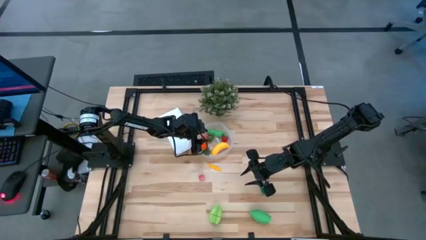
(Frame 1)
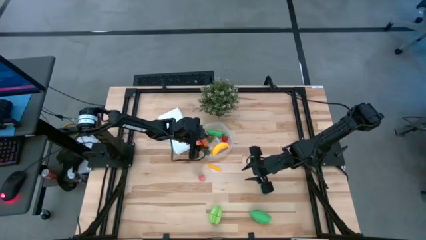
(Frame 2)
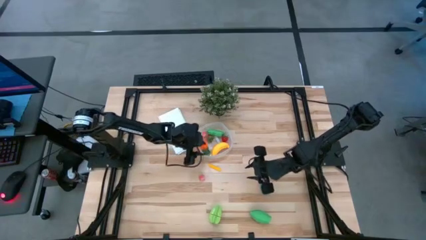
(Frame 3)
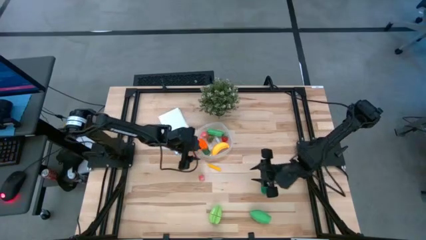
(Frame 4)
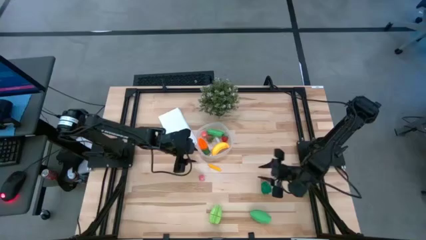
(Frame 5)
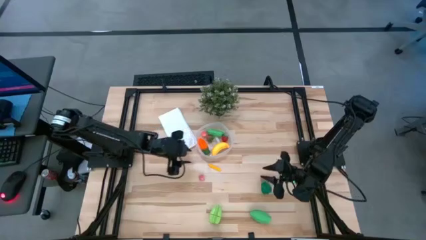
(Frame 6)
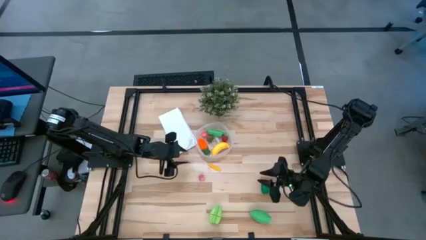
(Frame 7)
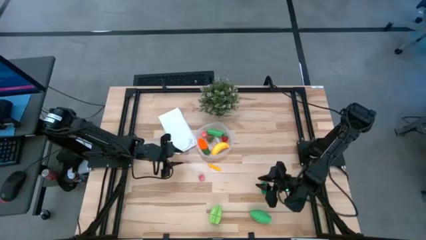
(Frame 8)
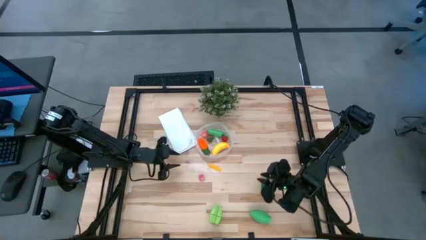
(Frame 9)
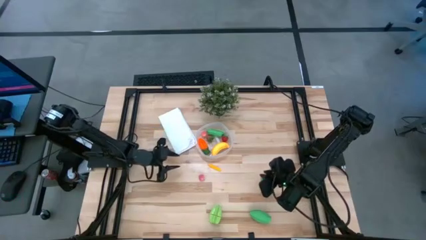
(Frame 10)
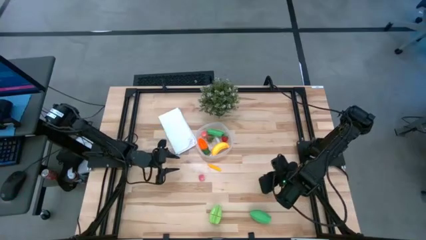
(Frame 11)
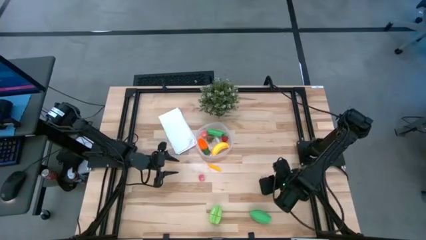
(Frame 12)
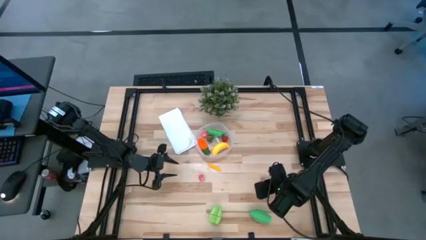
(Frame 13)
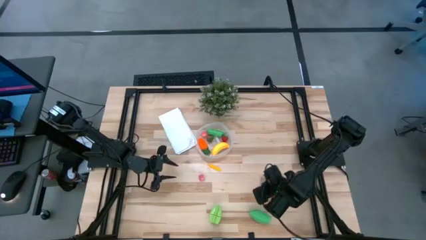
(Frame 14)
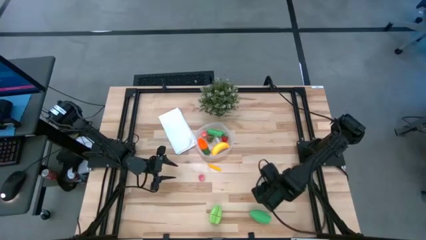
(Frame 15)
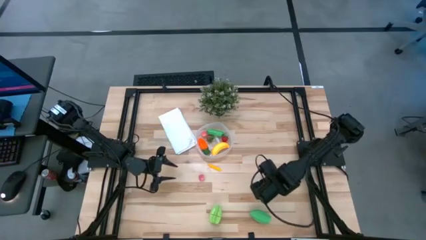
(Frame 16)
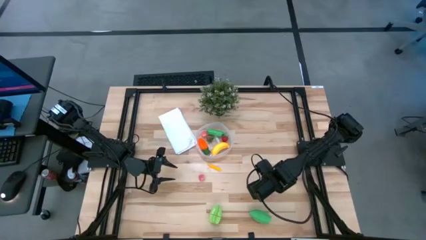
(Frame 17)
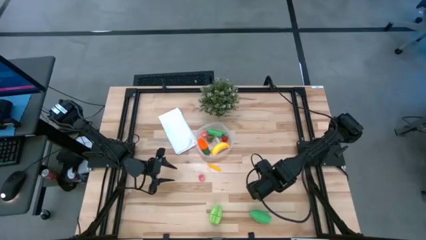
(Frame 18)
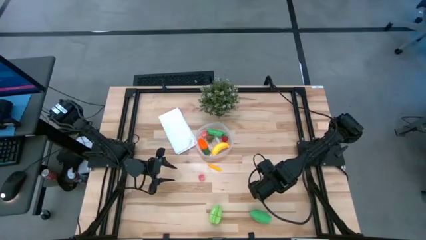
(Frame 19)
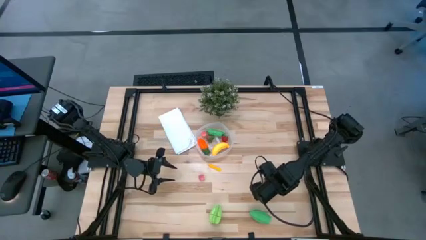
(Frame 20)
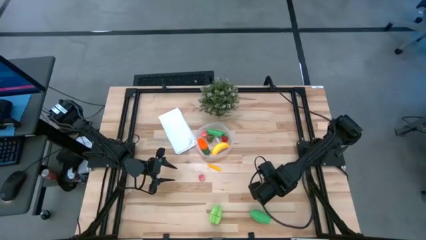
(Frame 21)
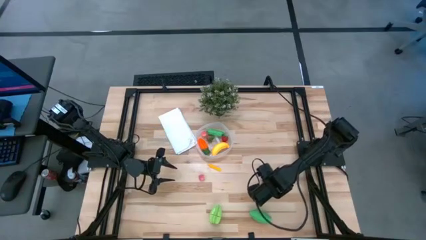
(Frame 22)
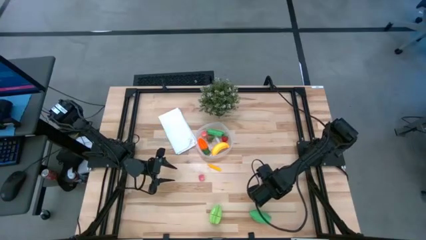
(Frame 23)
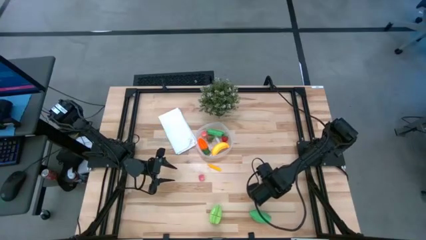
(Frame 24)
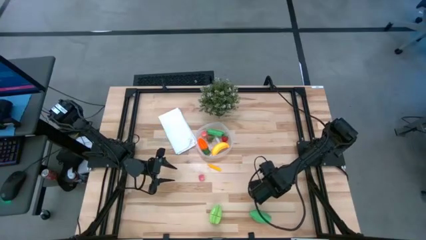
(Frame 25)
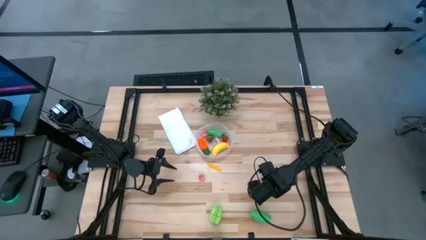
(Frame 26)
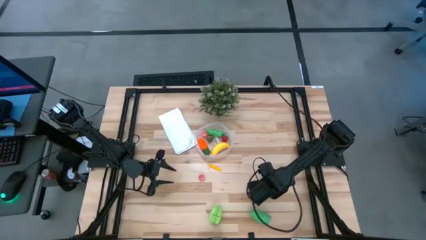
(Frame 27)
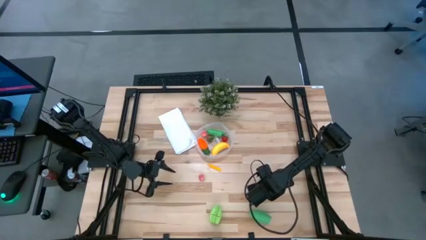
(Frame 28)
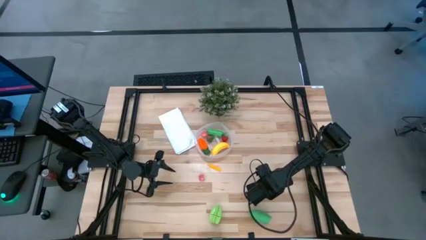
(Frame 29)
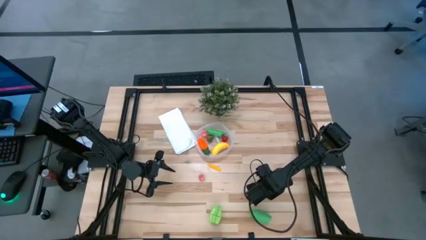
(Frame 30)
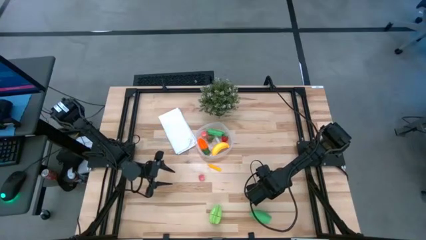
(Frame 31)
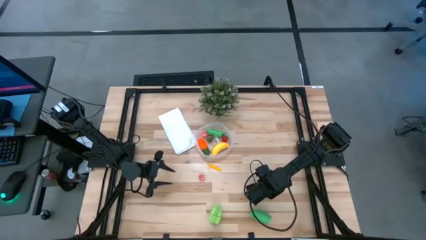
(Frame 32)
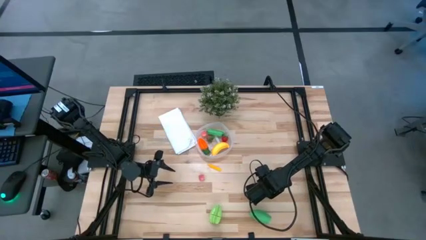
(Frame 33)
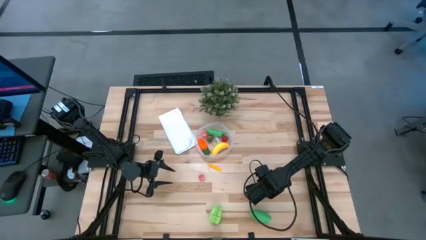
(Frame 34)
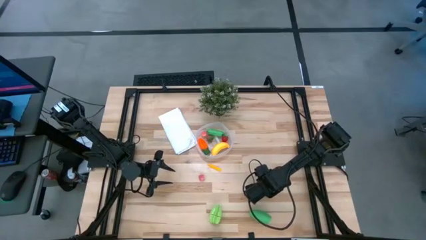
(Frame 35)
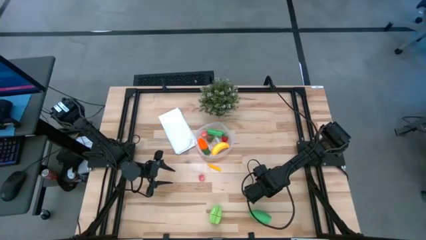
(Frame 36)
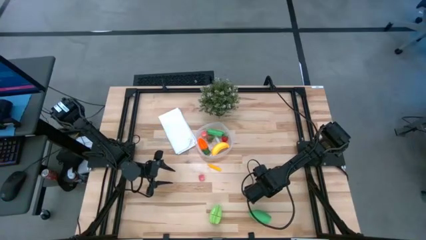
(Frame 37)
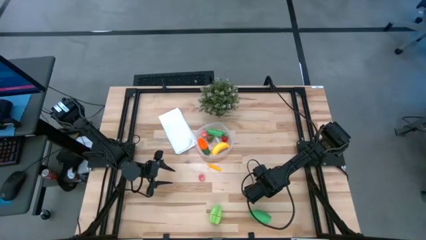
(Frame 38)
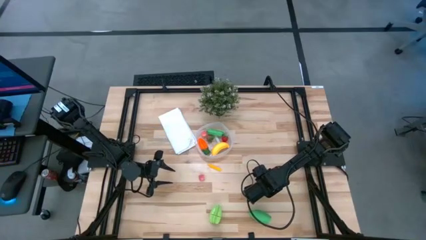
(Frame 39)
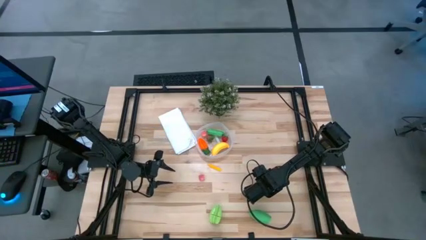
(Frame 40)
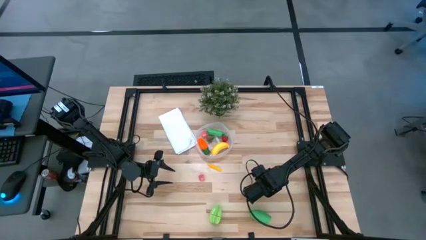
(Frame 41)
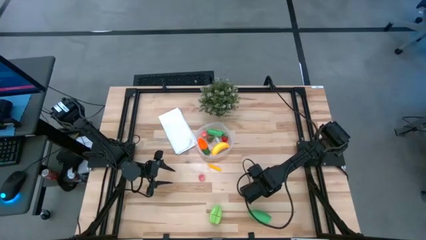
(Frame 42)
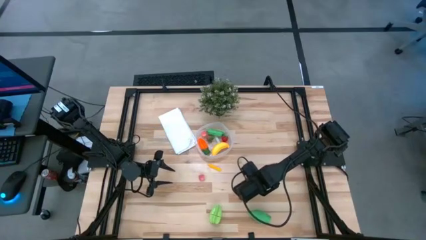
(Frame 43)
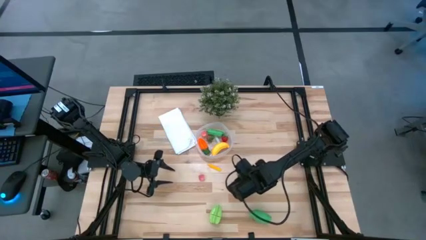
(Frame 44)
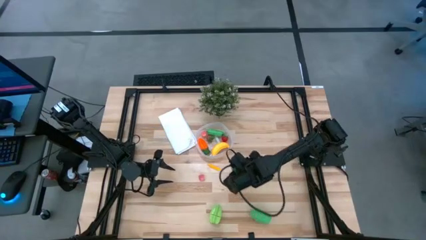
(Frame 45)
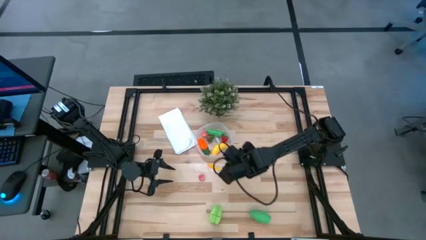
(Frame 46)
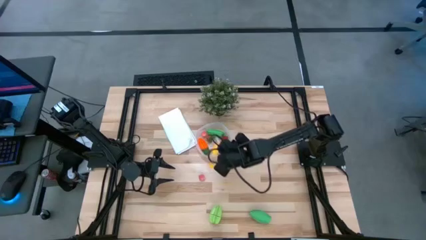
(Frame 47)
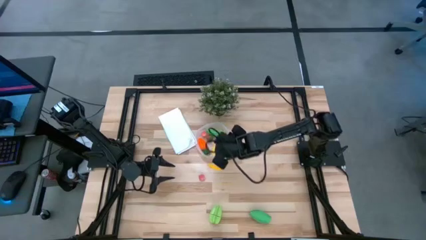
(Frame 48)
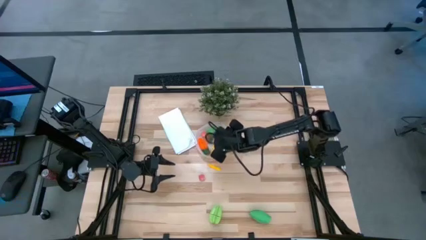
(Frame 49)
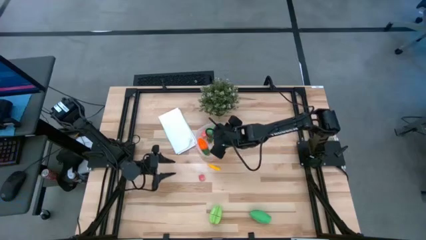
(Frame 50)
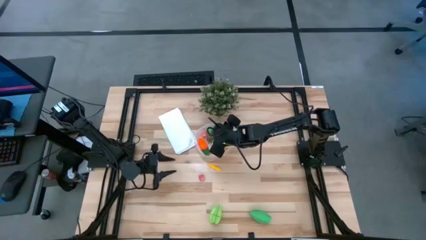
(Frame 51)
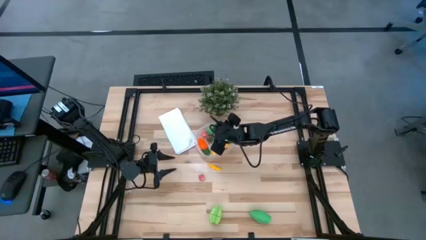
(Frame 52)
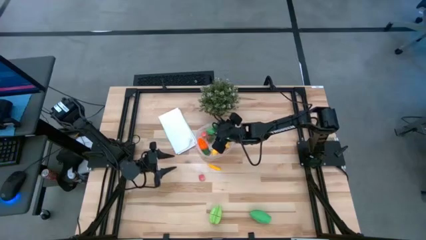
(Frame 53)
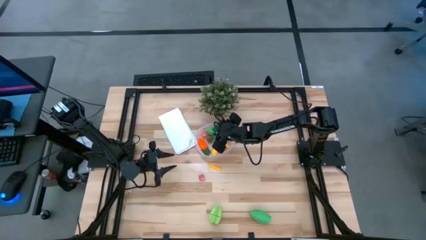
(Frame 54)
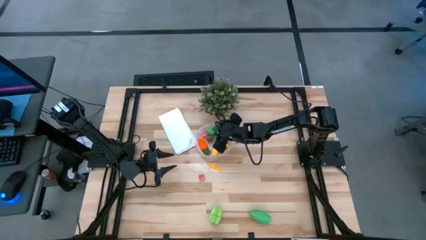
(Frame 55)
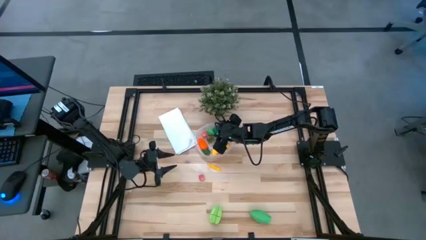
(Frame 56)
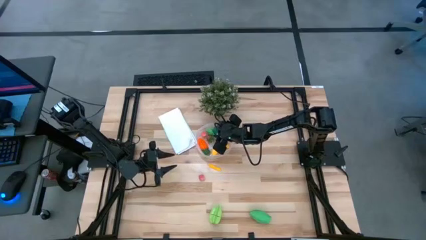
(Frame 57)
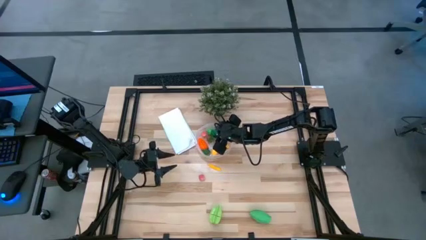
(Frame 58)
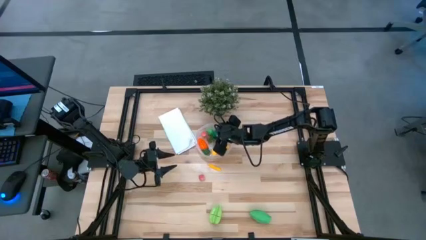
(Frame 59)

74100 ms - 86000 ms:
Task: Pick and placing Produce into tupperware
Put the green bell pepper into the transparent bin

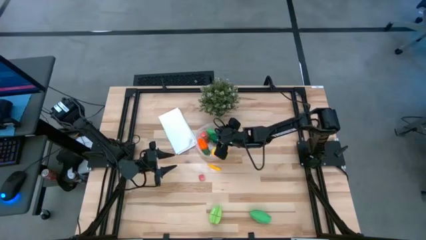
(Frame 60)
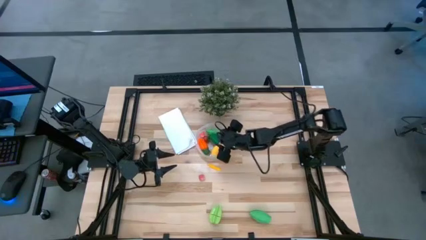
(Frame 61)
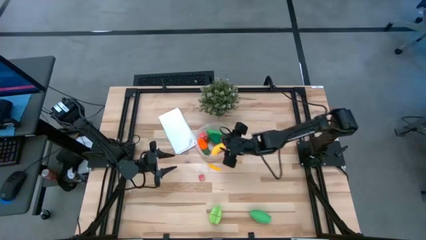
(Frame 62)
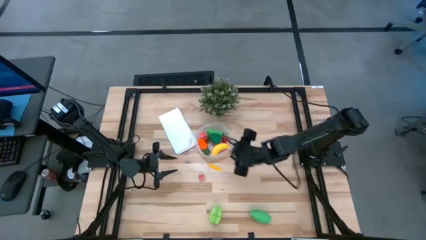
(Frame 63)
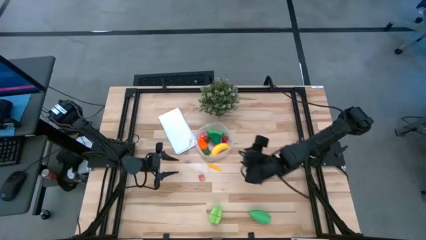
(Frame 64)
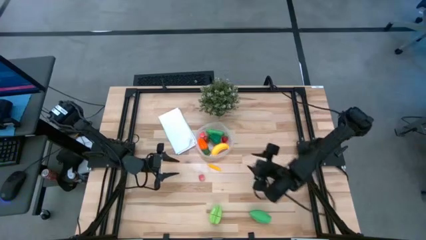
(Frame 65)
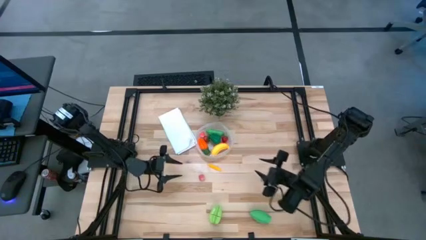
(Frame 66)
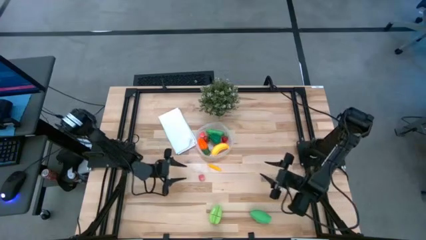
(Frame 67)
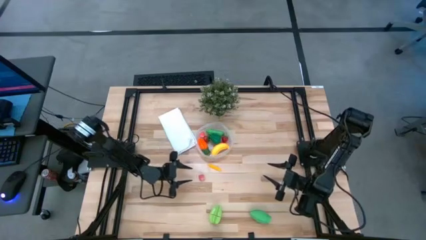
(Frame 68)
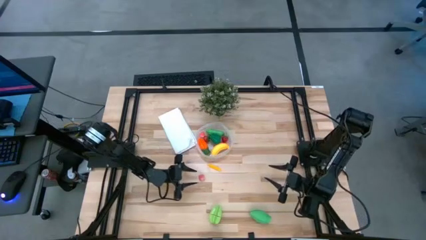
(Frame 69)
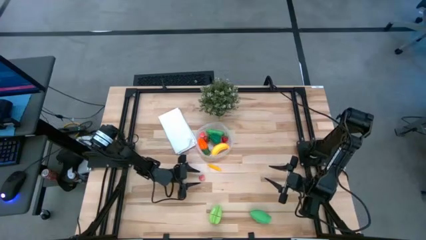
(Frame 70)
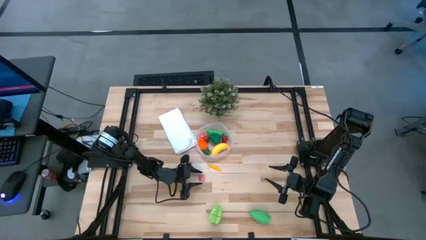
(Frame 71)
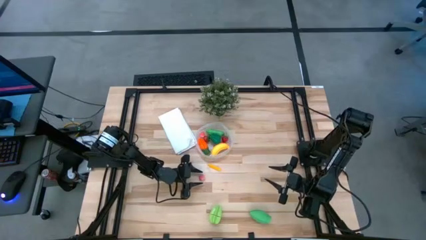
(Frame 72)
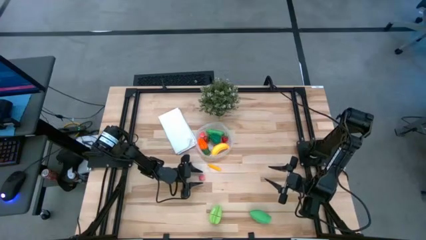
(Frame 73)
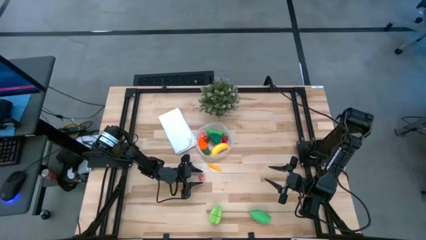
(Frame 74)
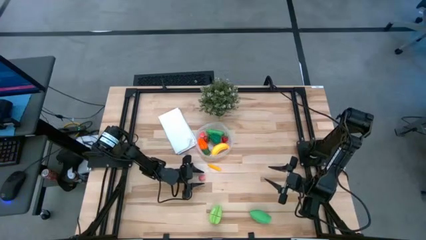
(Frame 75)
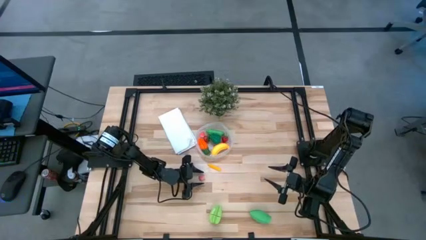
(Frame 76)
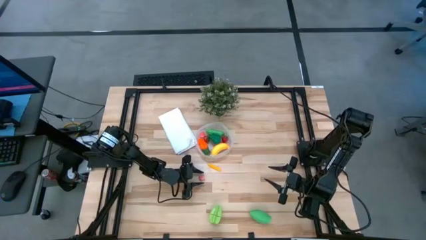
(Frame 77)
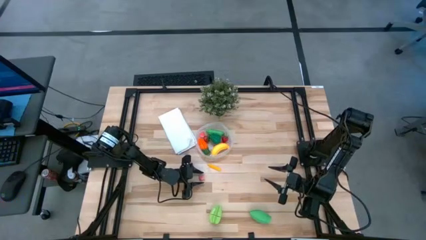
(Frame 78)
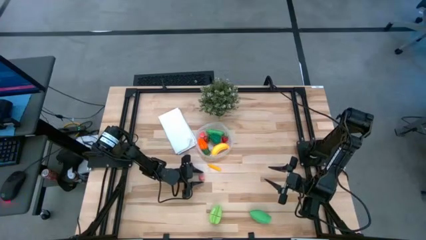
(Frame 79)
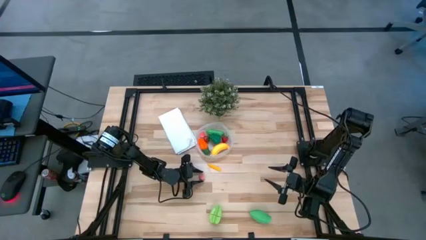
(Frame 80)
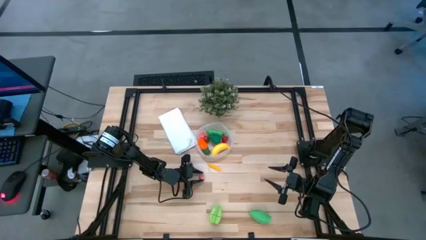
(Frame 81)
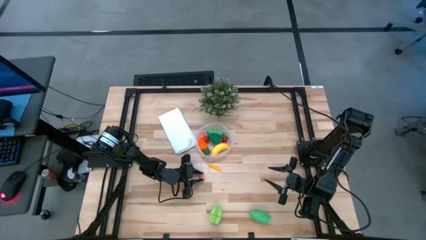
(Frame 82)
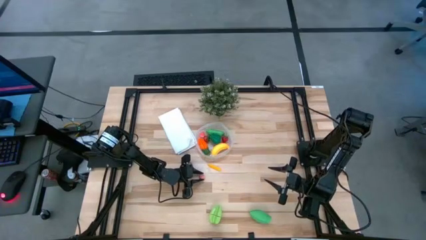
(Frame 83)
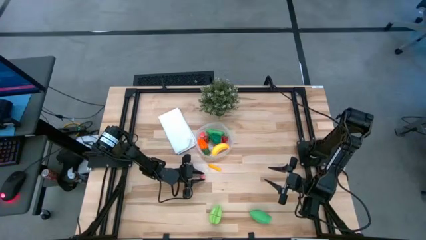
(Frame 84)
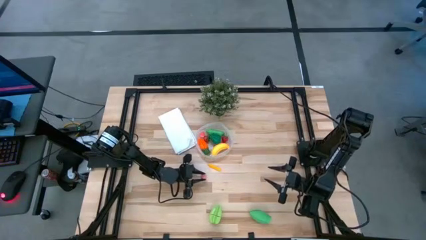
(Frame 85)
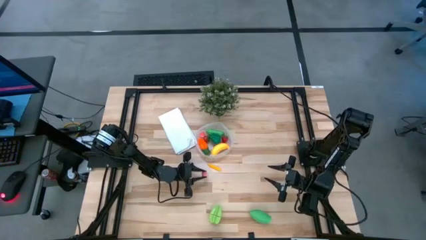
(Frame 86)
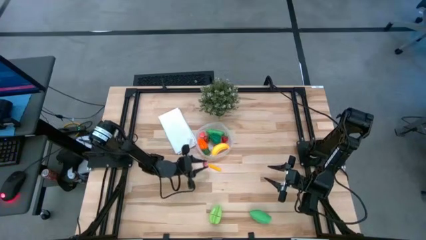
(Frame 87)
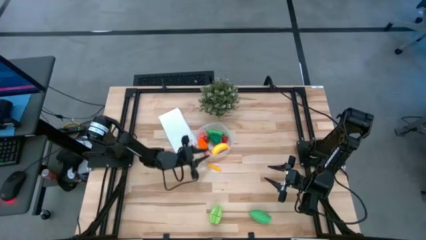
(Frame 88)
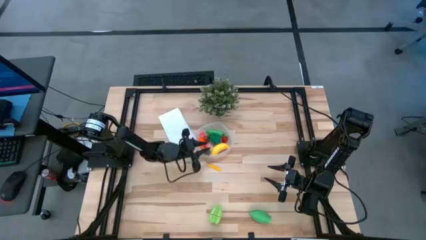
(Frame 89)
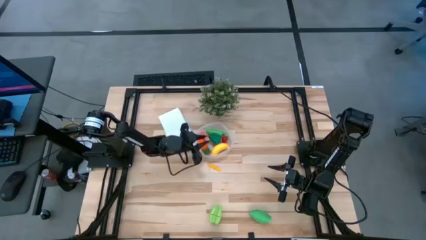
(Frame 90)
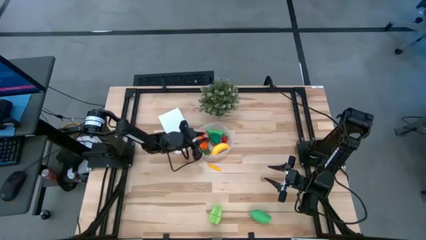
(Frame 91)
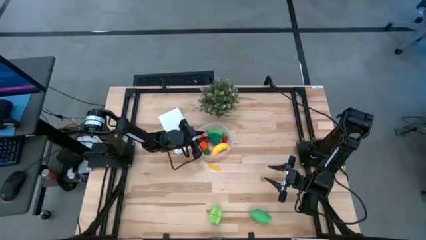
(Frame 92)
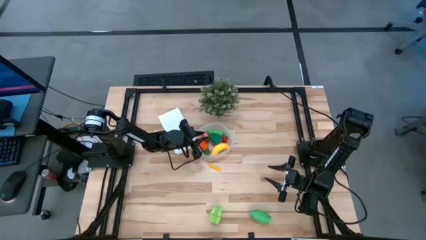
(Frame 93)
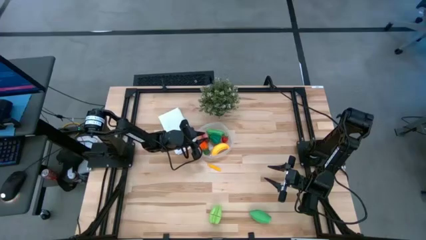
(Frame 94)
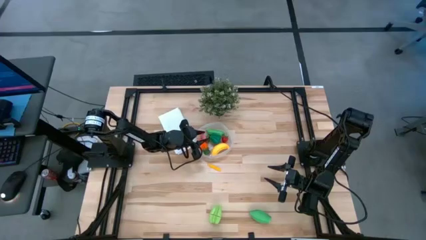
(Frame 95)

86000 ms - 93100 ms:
Put the pink peach into the transparent bin
